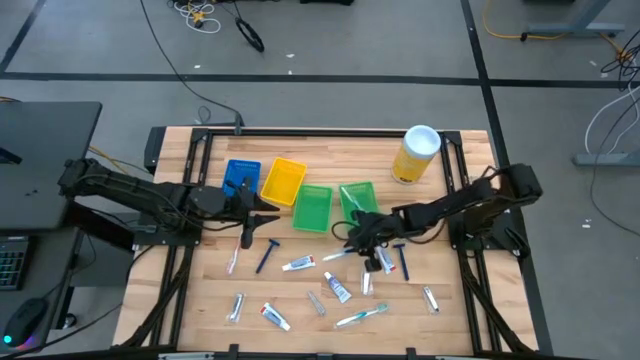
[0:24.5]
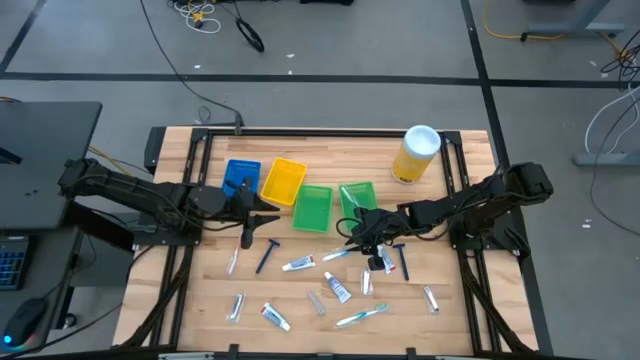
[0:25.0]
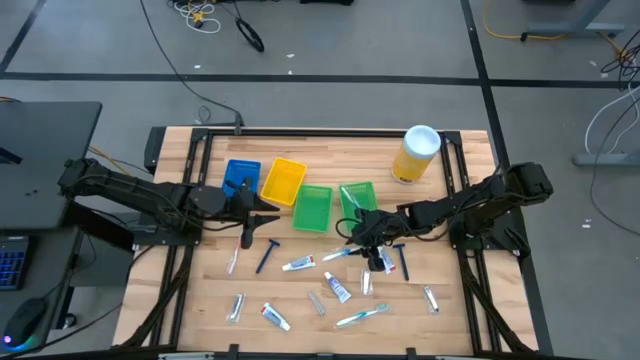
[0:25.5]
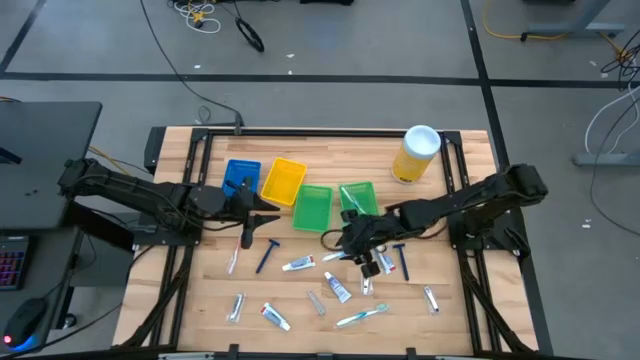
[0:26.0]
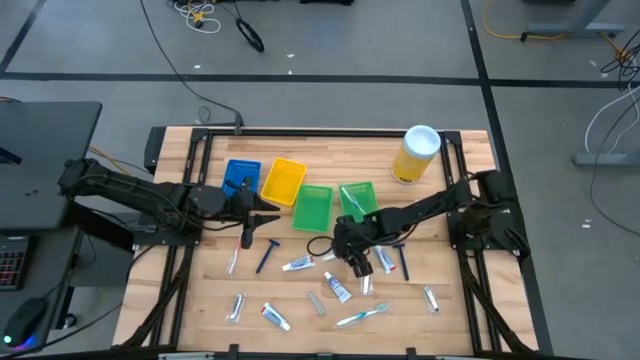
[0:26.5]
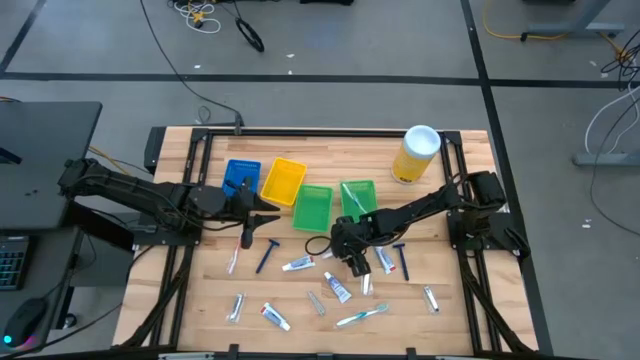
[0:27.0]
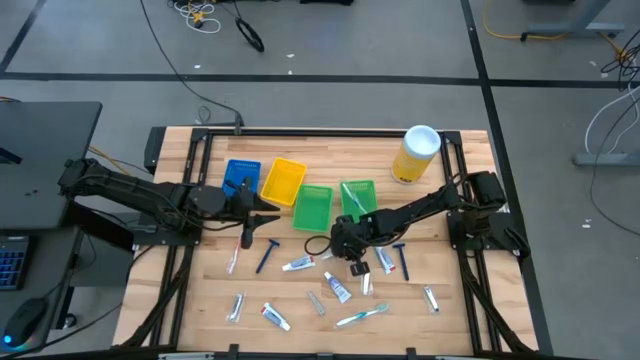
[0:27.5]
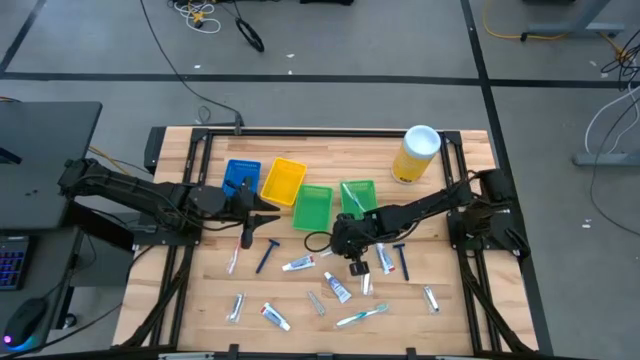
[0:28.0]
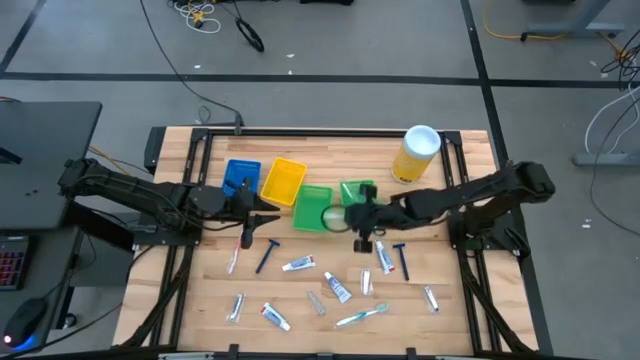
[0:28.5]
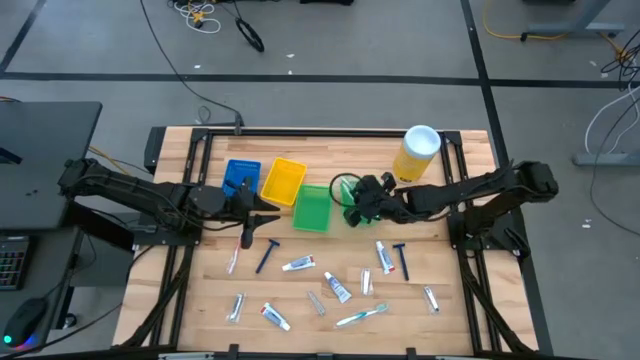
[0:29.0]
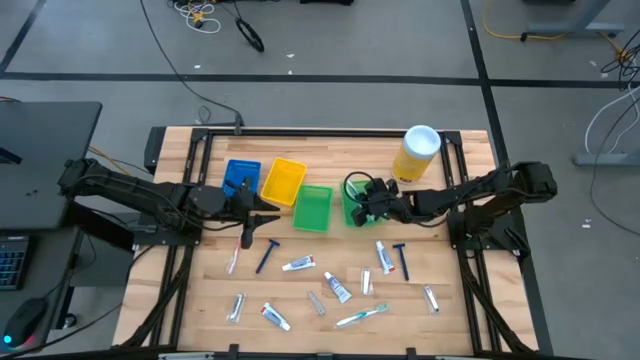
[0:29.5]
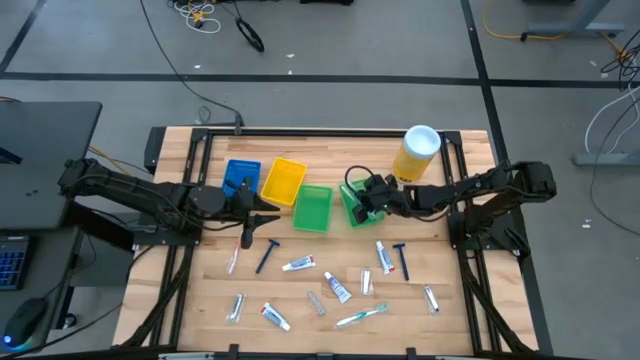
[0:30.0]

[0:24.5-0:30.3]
Task: Pick & Place Travel size toiletries
Put the blue toothbrush into the right green bin

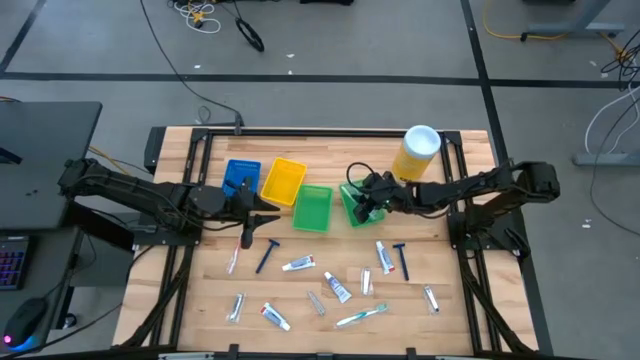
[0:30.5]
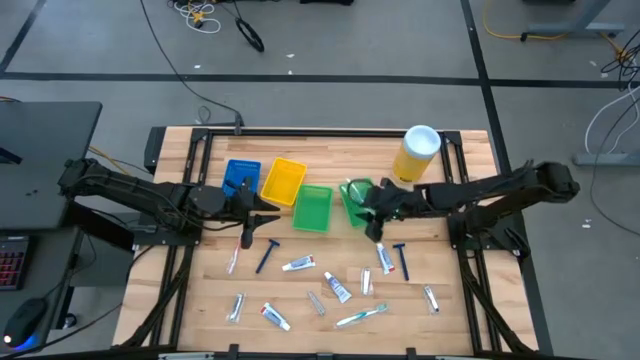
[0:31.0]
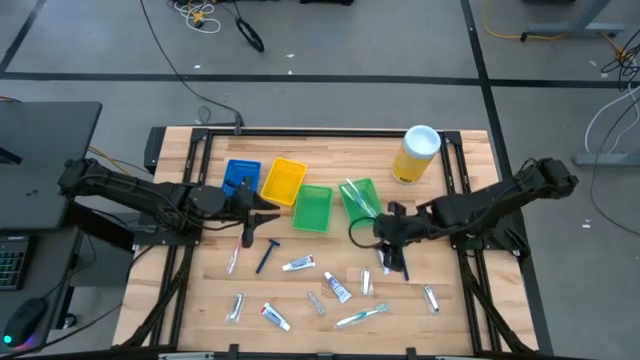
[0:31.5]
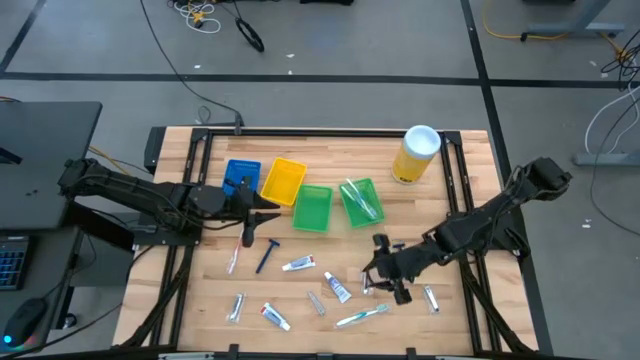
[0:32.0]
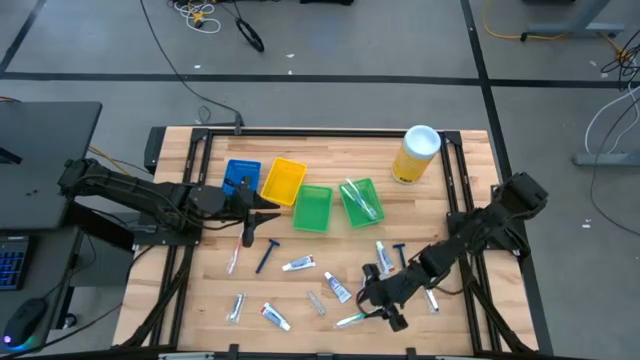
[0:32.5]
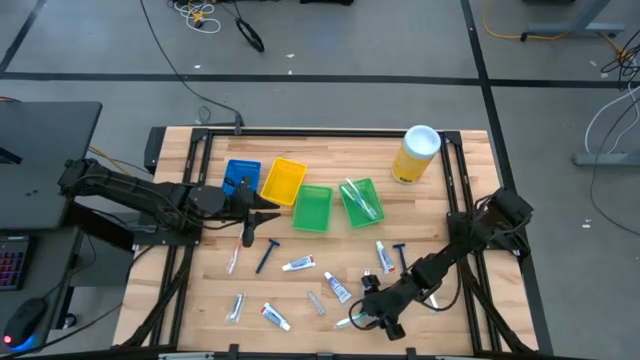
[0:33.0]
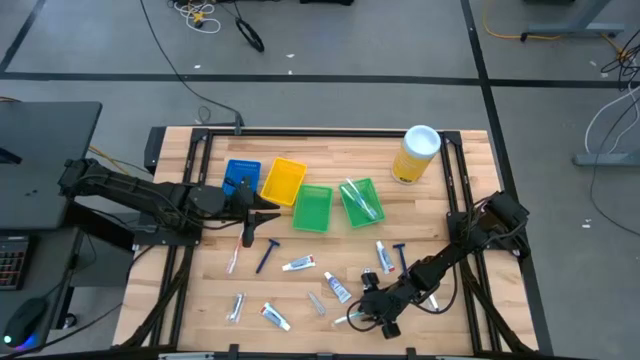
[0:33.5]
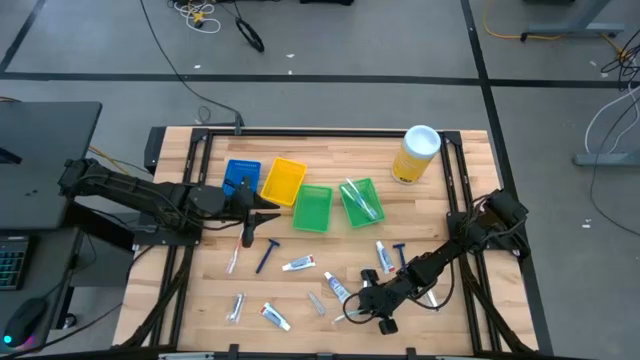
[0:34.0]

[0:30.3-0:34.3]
Put the green toothbrush into the right green bin

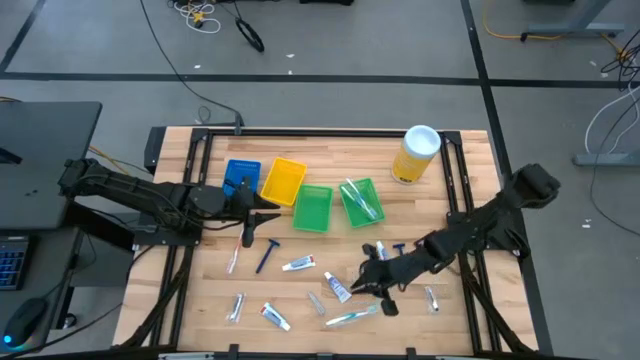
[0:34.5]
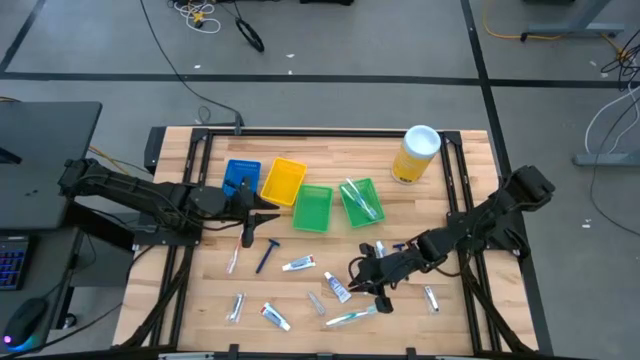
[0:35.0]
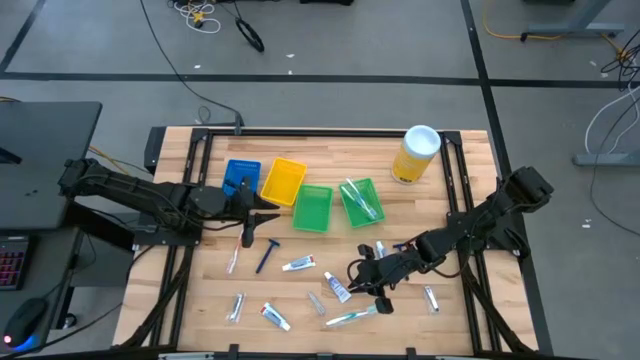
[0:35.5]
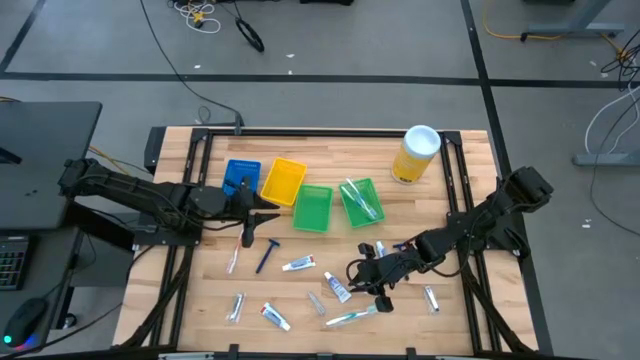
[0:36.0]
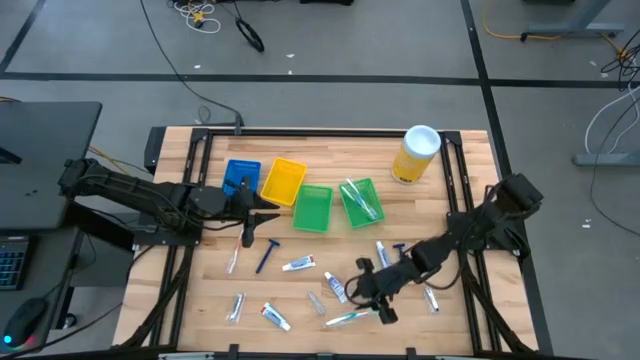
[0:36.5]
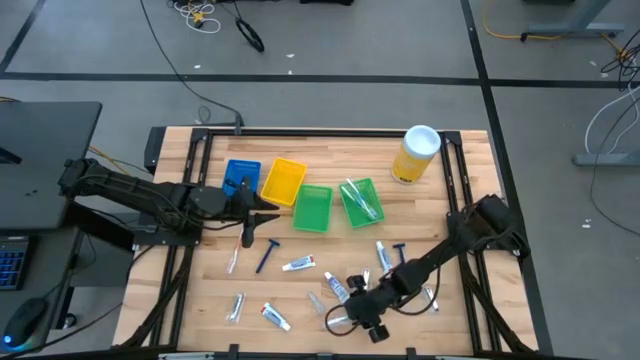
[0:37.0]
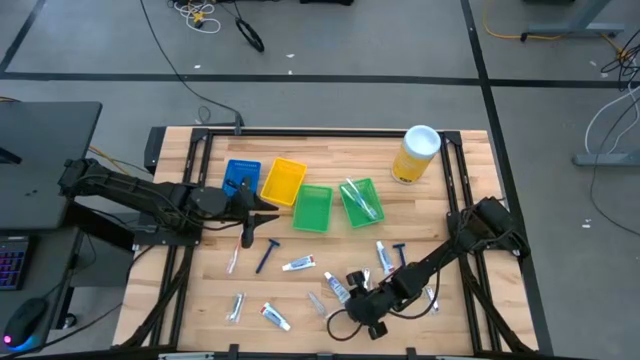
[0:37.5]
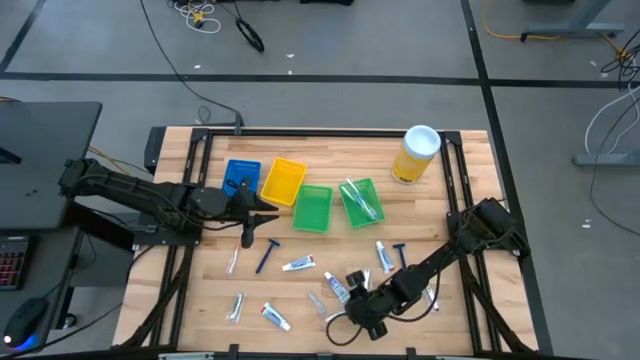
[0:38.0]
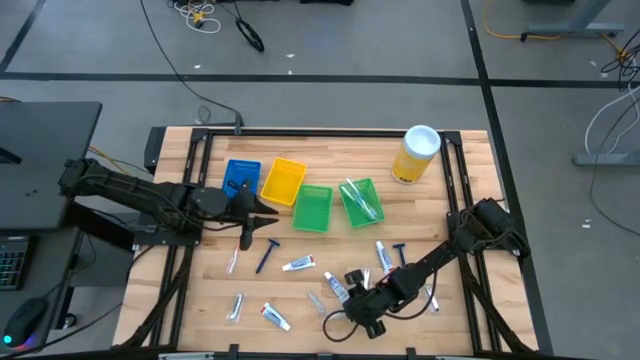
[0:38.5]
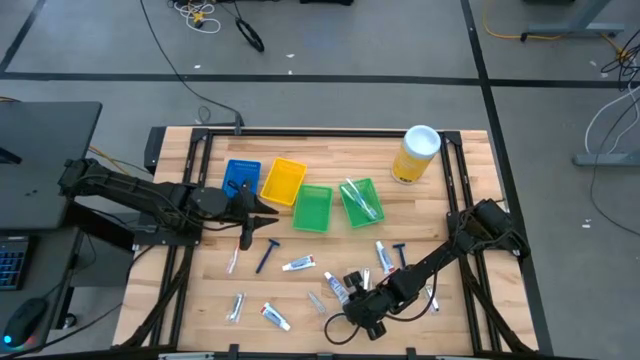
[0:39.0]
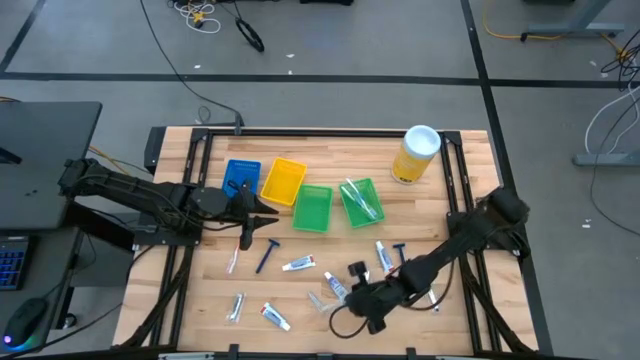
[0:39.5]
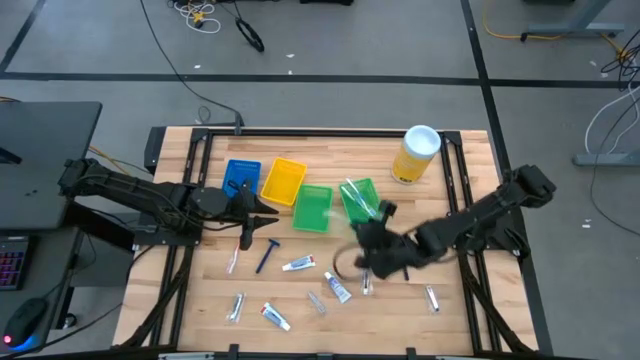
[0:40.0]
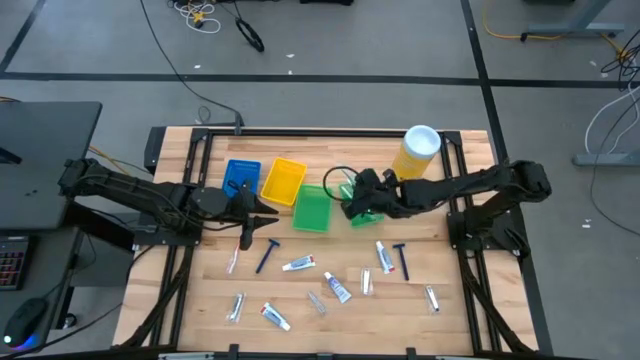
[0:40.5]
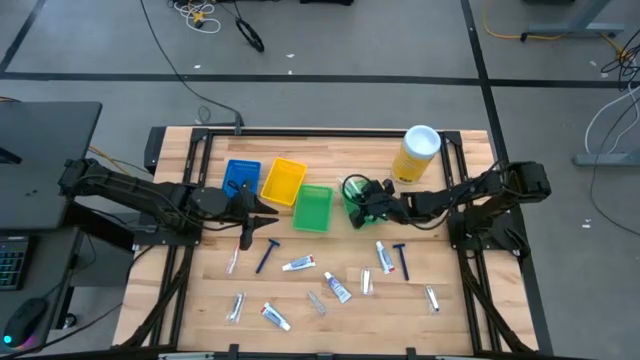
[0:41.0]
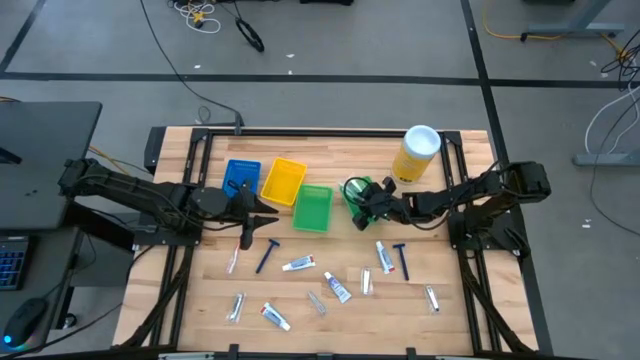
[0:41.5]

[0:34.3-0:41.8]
Put the green toothbrush into the right green bin

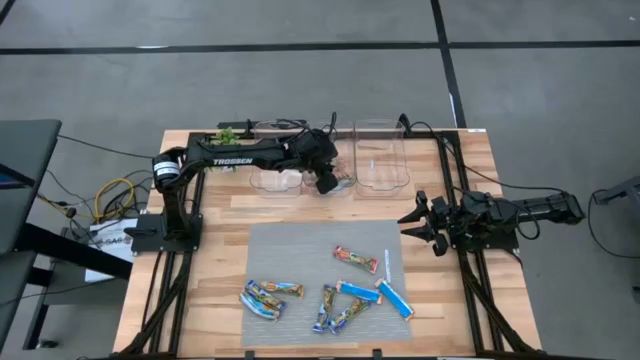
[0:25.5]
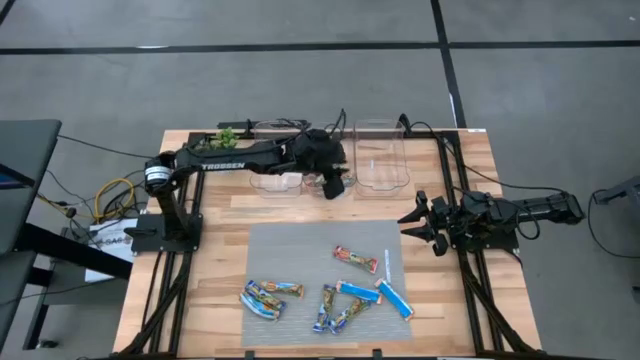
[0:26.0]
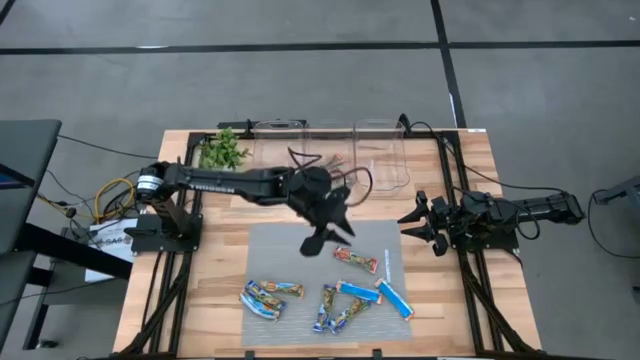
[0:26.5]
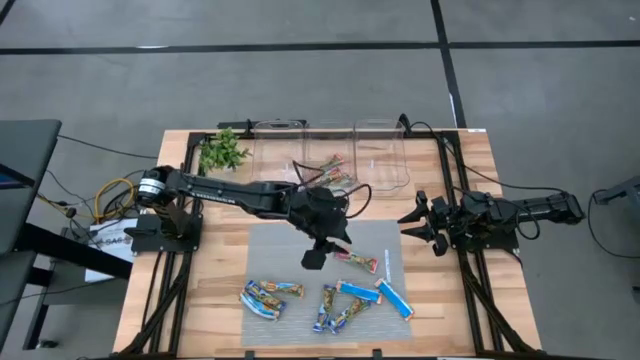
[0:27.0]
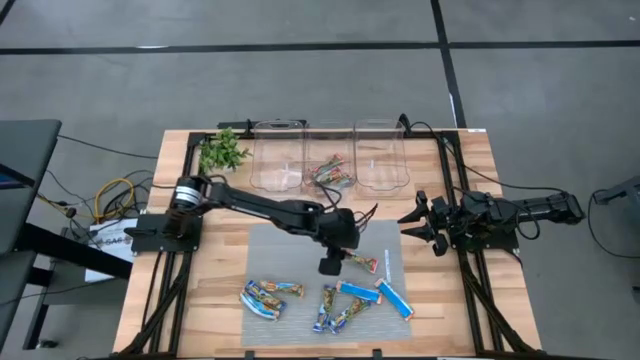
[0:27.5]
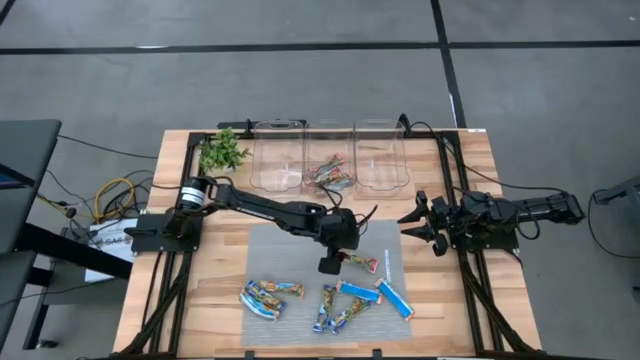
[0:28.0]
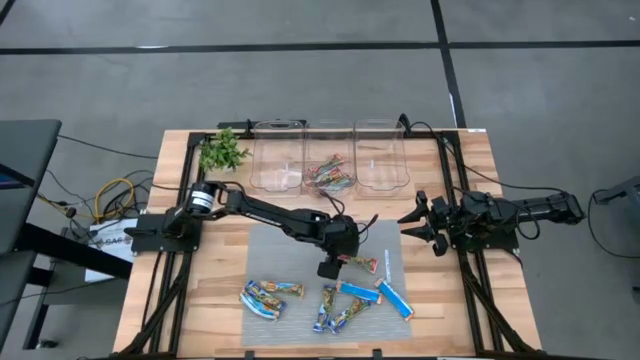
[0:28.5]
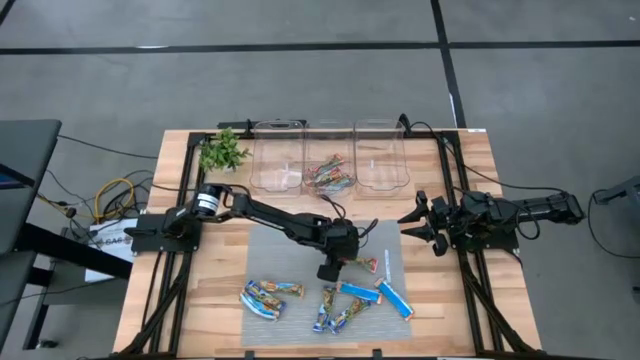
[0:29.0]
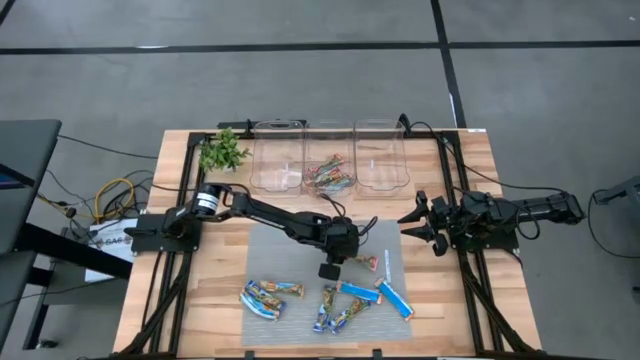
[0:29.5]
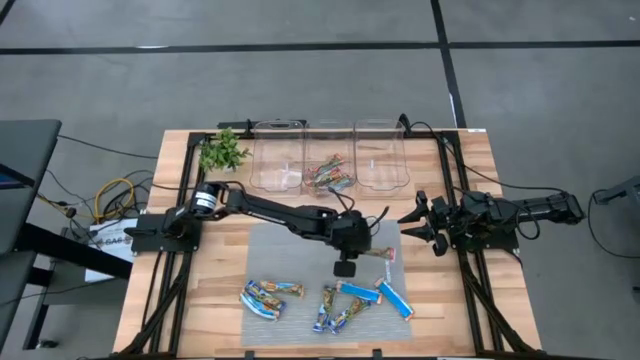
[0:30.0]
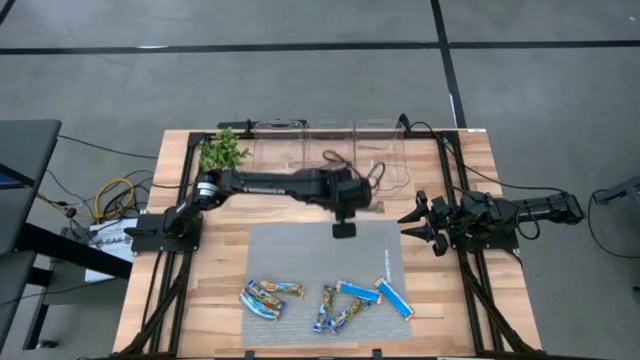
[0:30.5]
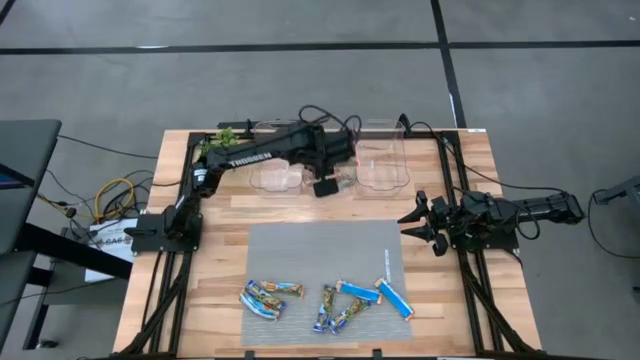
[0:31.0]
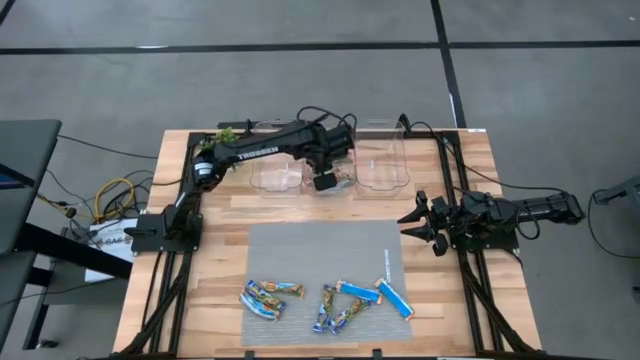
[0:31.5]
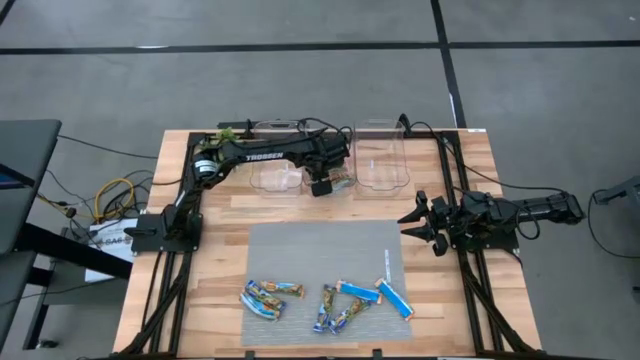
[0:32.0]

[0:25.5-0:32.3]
Task: Pick and place Granola Bars by type
Put the red granola bar into the middle transparent bin
